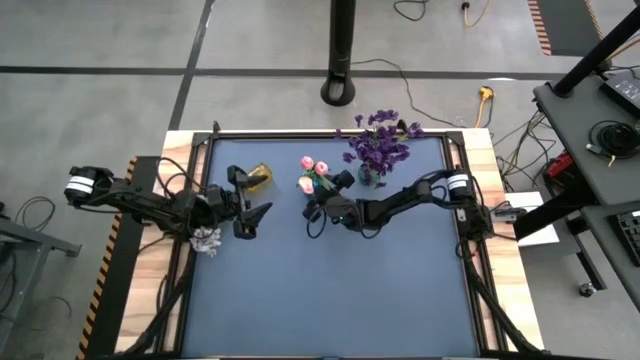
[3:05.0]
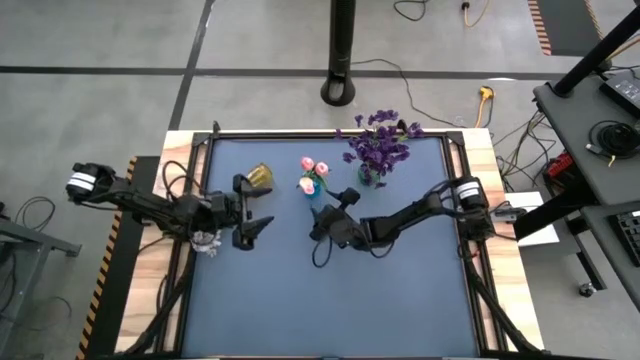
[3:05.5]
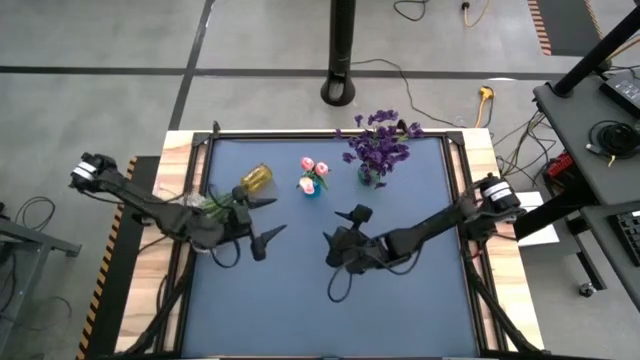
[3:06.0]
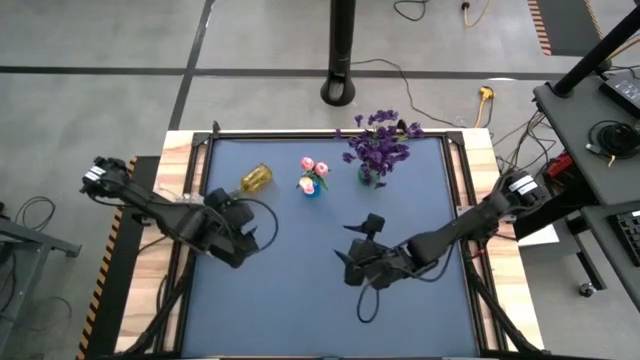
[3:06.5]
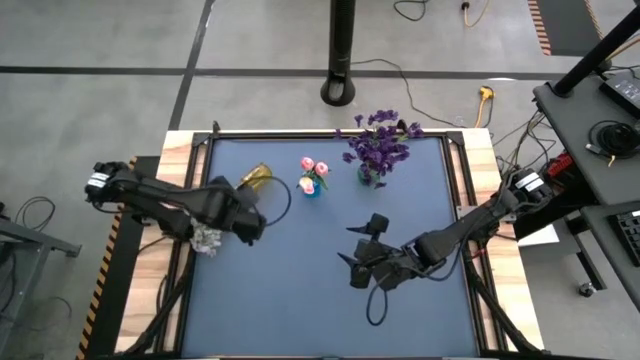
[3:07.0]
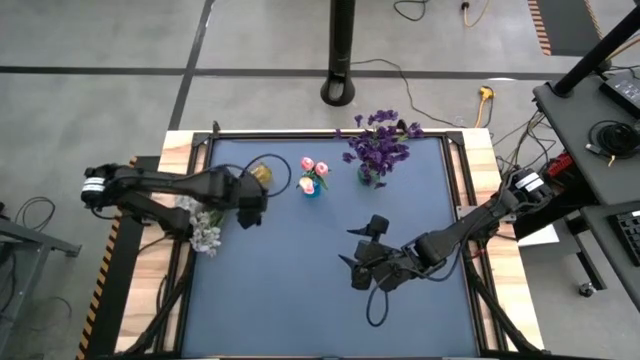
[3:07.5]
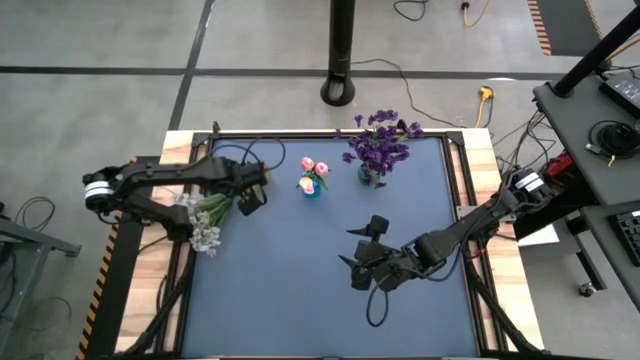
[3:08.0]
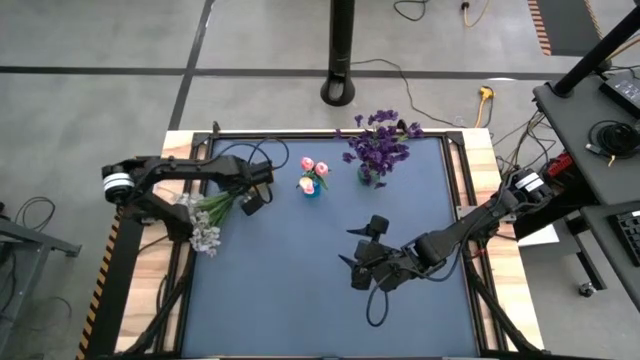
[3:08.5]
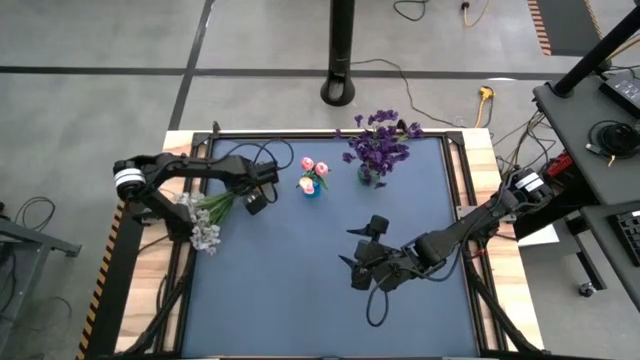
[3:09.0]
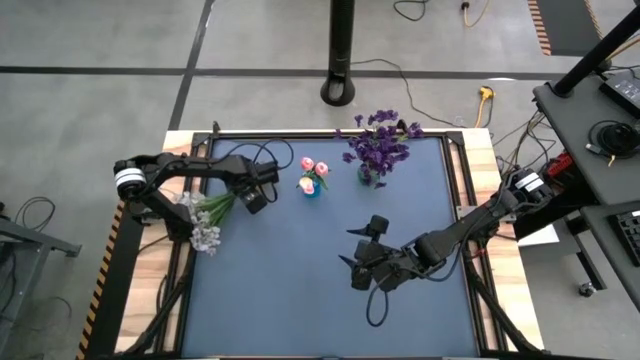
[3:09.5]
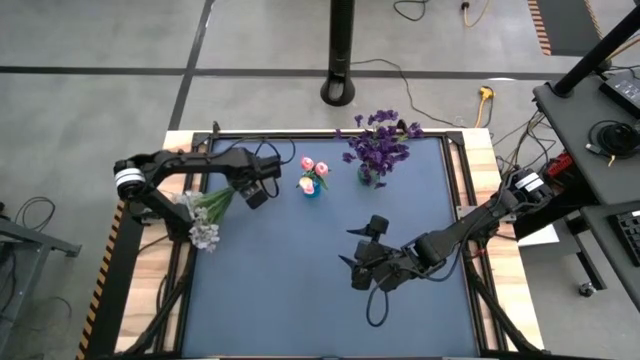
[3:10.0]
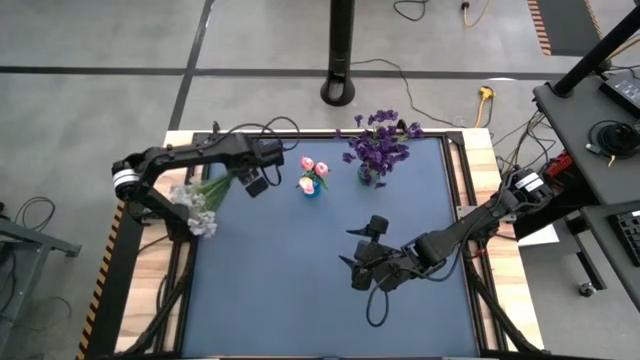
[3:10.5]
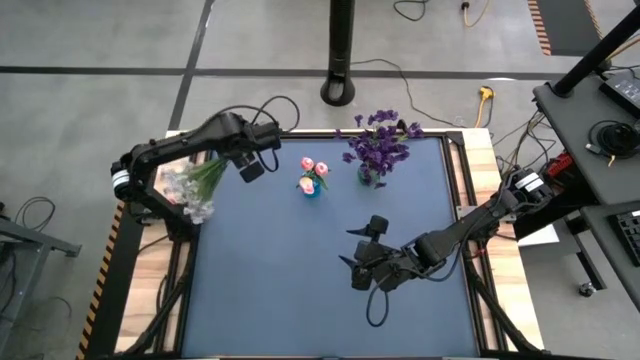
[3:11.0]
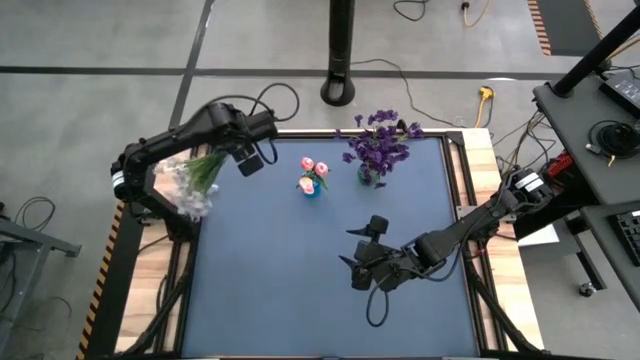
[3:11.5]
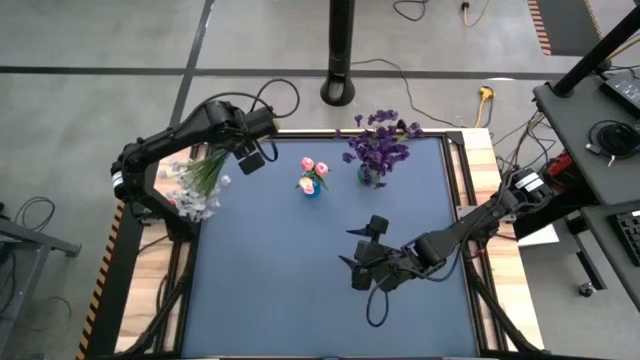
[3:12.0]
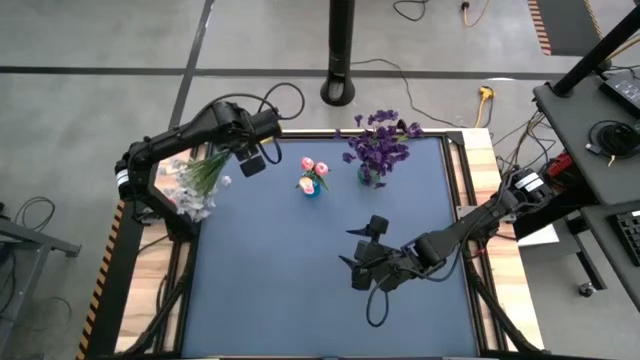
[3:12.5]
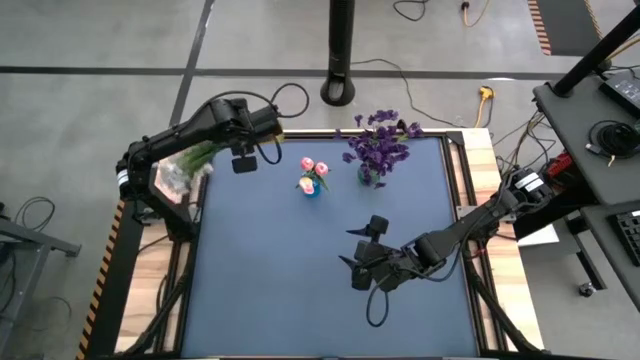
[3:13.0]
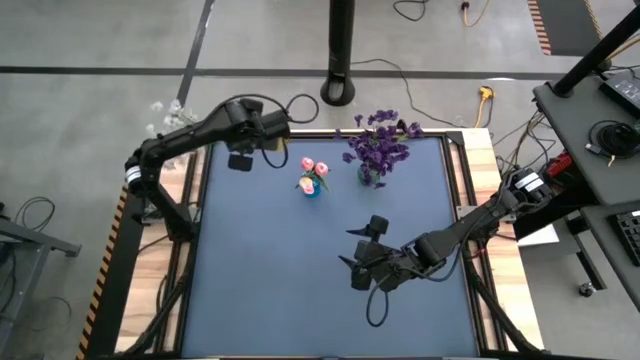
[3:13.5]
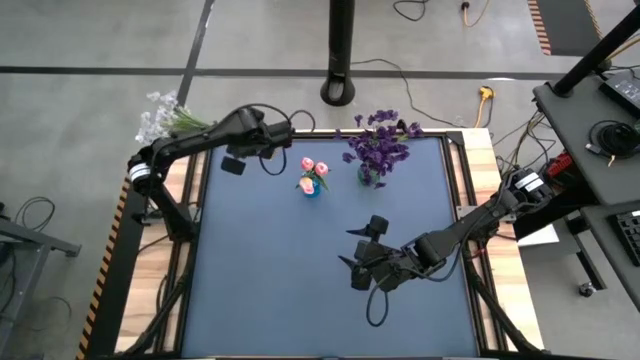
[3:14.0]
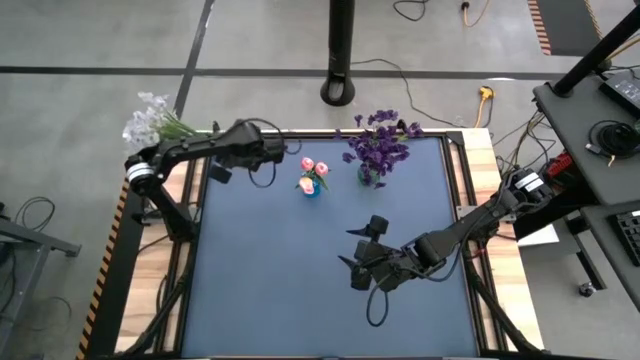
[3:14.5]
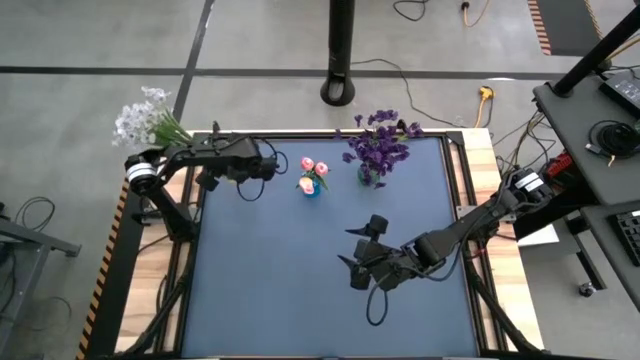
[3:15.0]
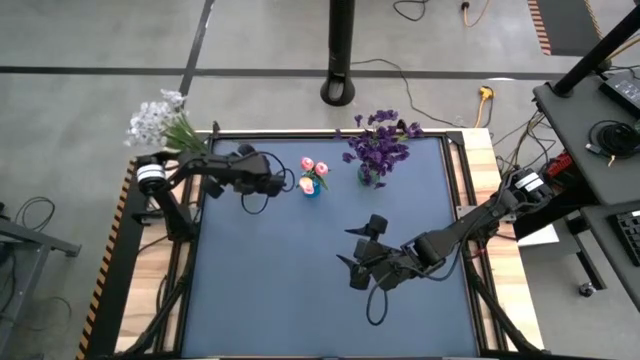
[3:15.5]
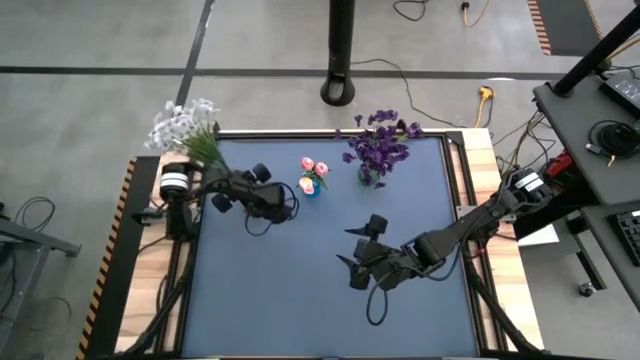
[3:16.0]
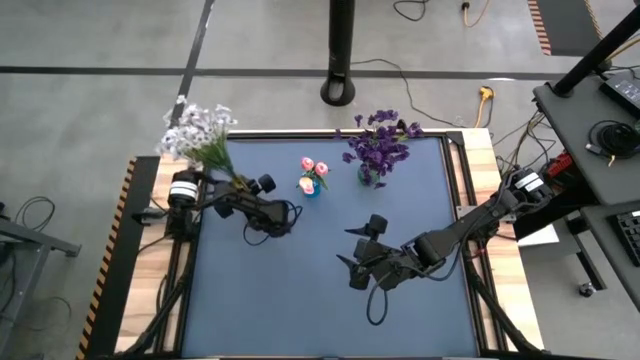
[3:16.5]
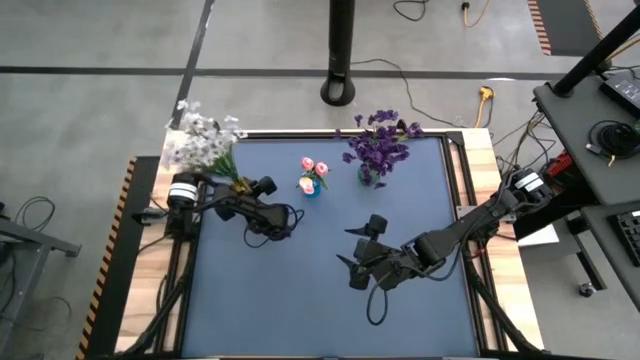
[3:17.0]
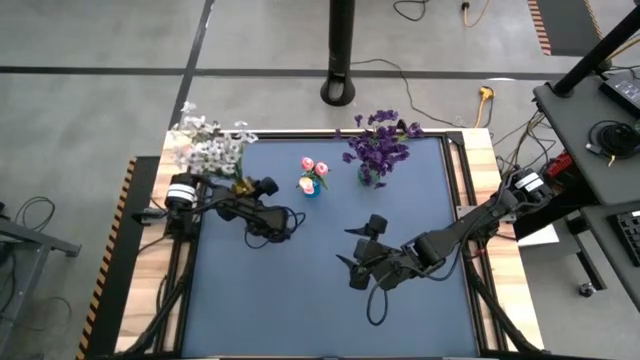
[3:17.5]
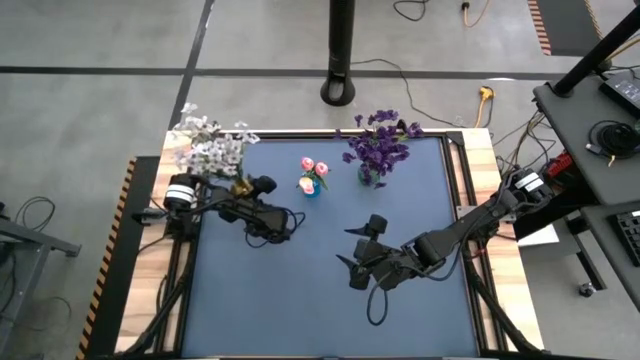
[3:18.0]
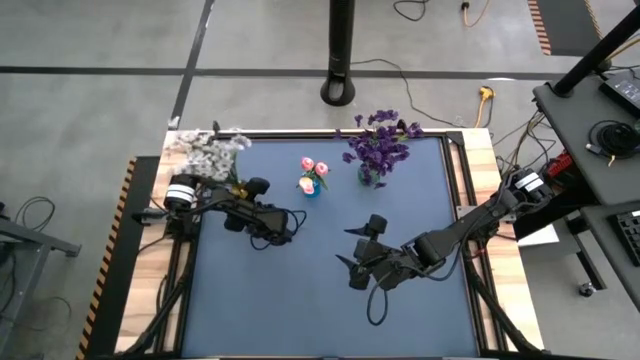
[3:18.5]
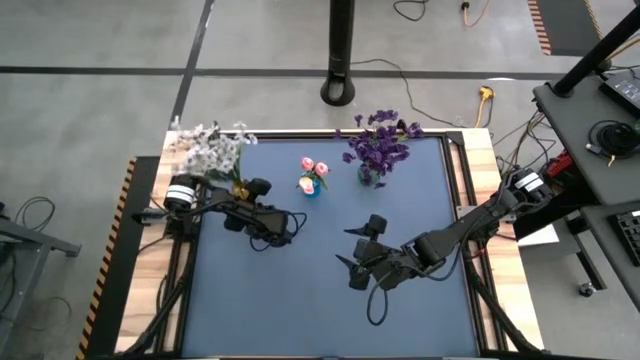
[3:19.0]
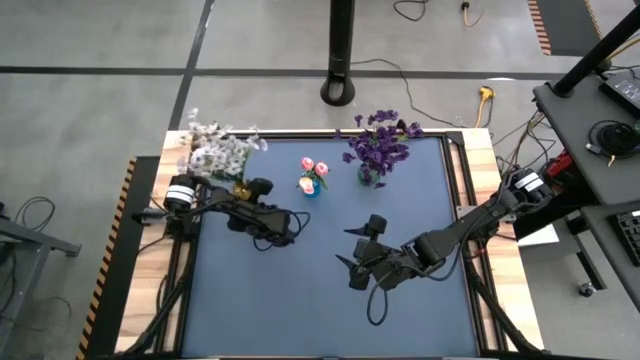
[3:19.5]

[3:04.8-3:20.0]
Task: Sort flowers into vase by color
Put the yellow vase with flowers on the table

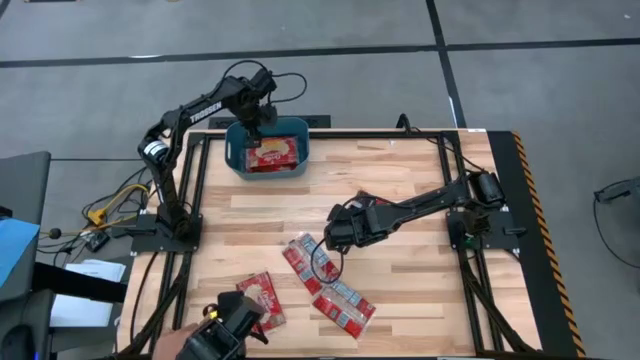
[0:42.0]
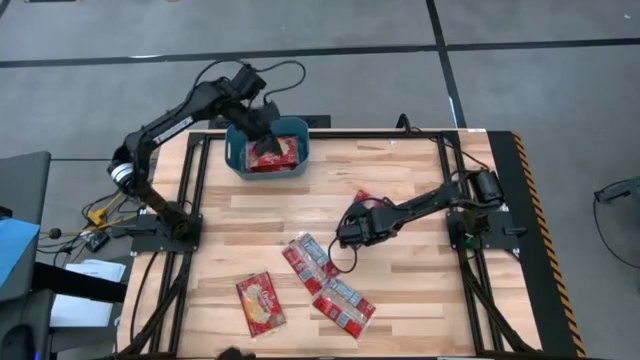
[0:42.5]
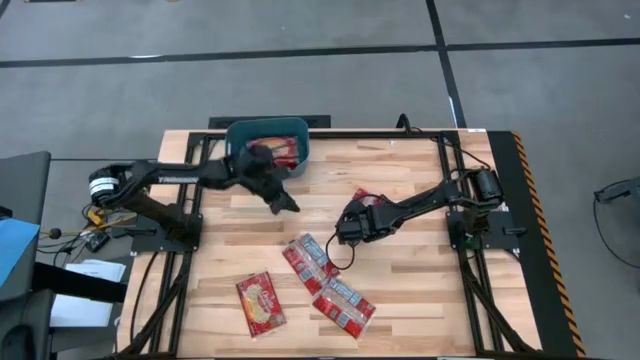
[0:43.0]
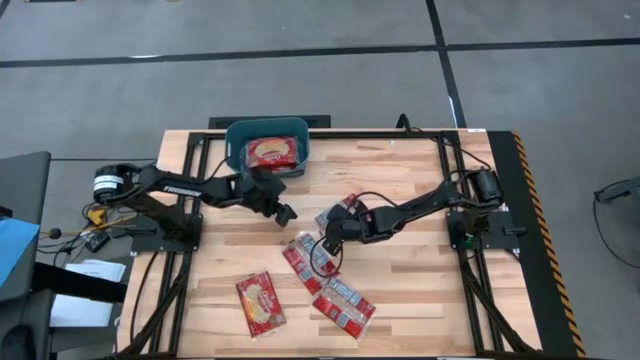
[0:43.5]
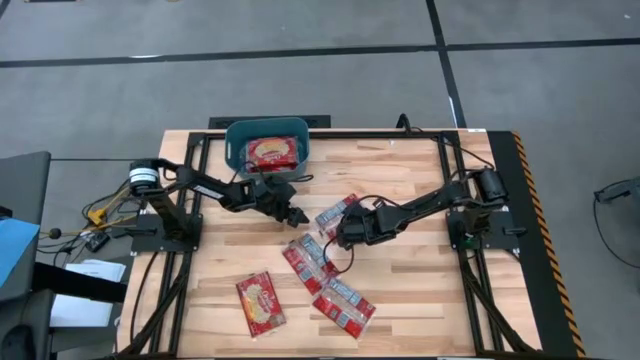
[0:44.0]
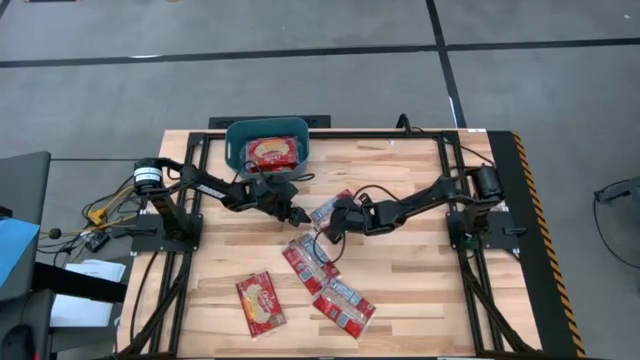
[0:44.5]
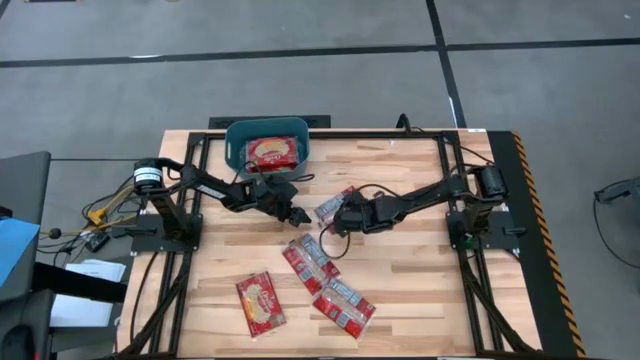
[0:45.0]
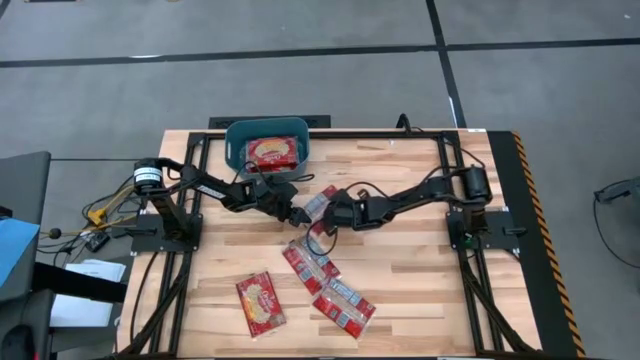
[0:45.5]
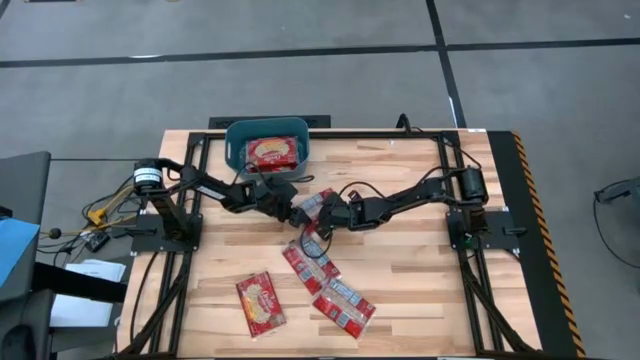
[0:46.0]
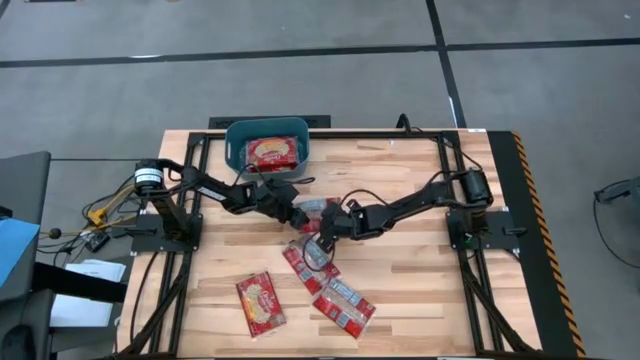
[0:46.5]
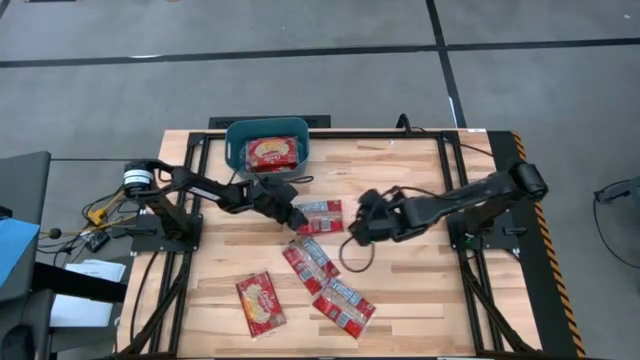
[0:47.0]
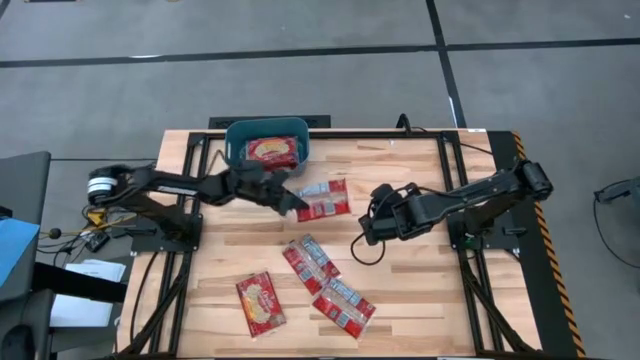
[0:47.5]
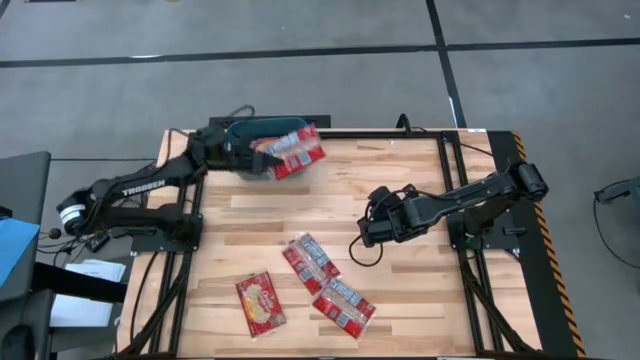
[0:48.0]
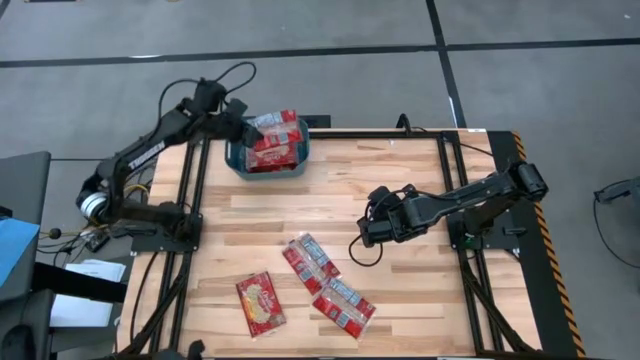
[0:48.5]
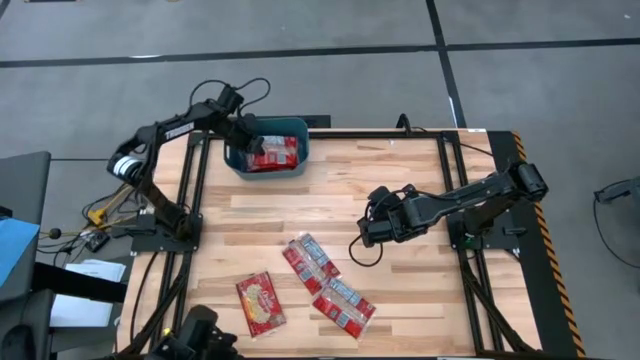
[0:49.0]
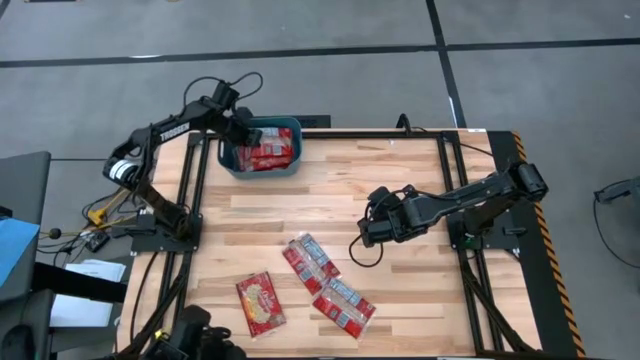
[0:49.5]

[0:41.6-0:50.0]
Task: Sort popcorn bags into baskets
Put the red popcorn bag into the blue bin
